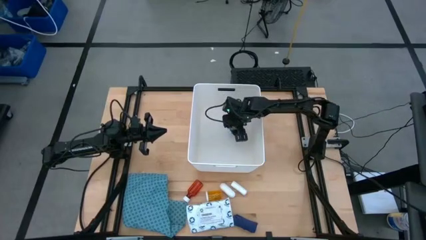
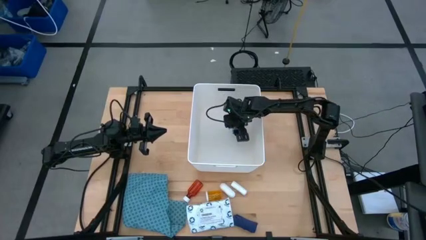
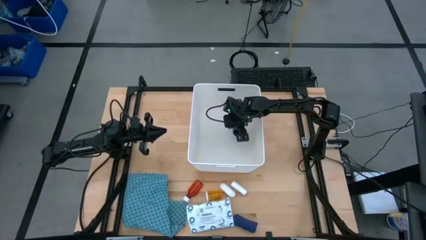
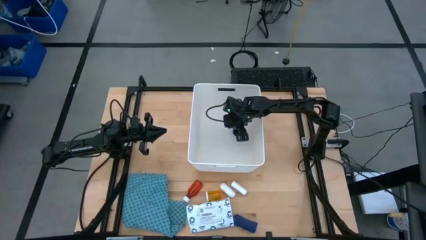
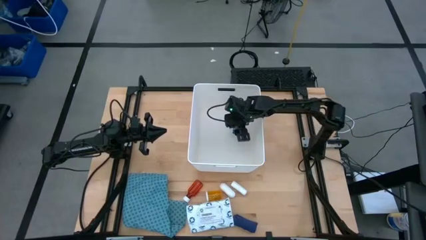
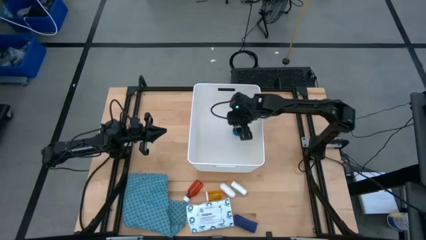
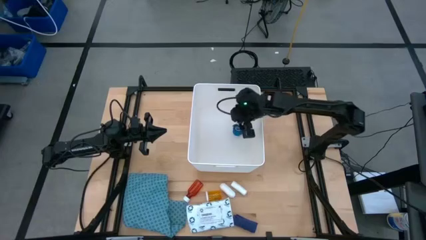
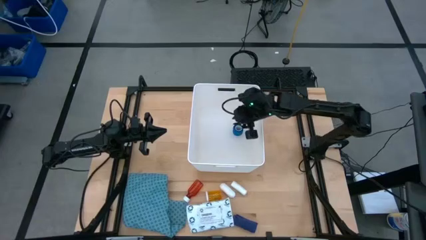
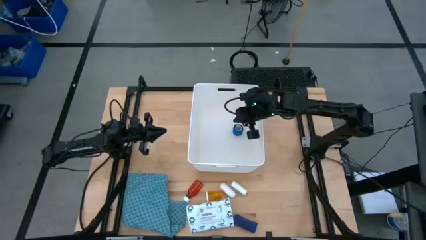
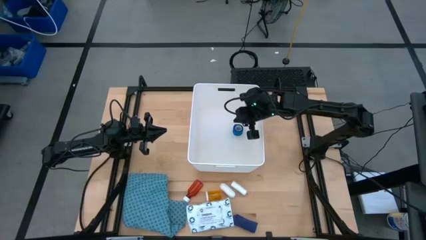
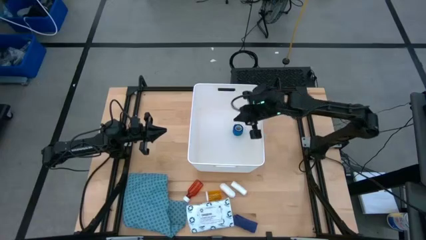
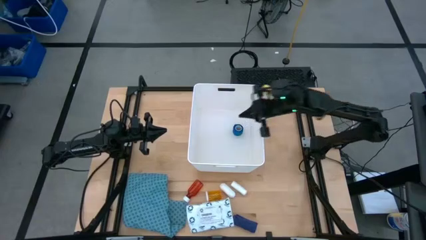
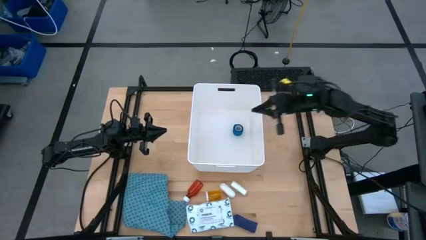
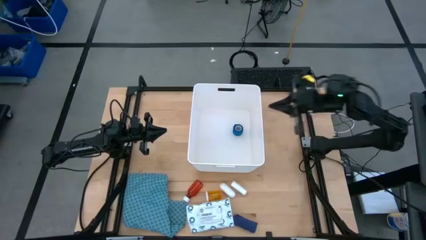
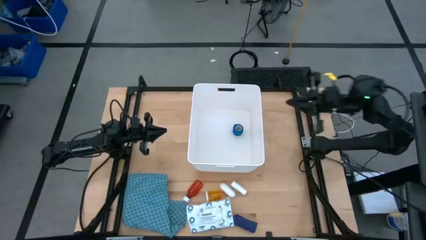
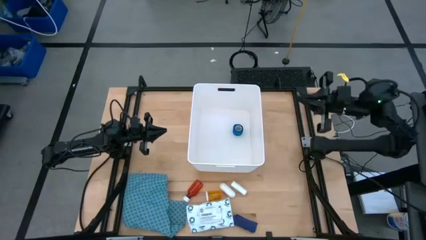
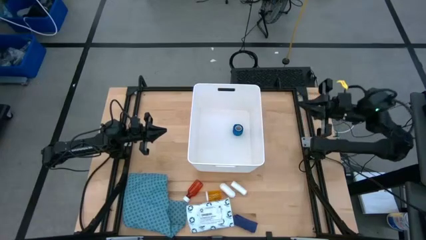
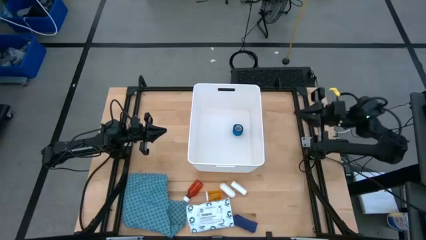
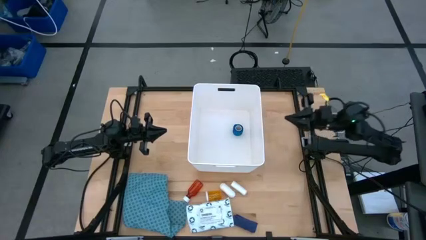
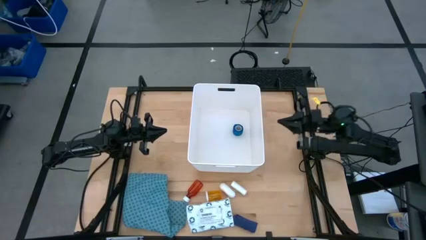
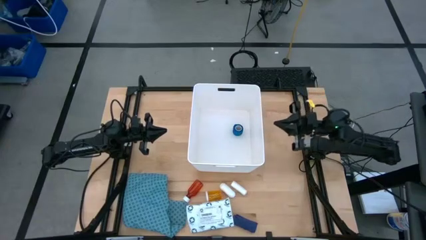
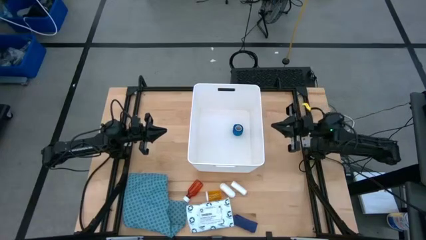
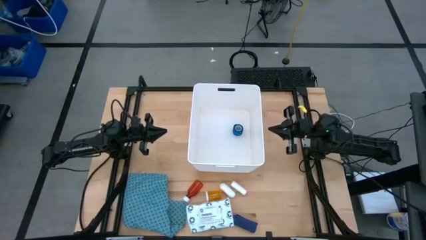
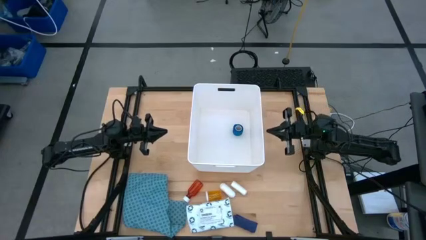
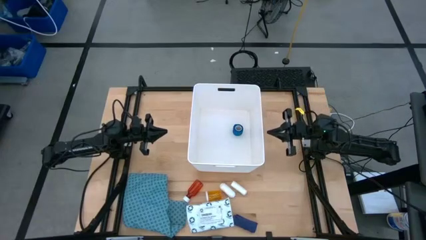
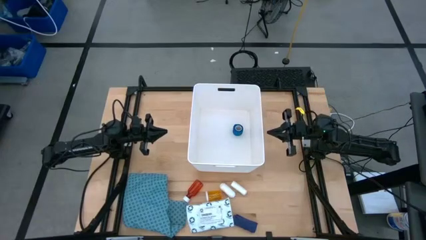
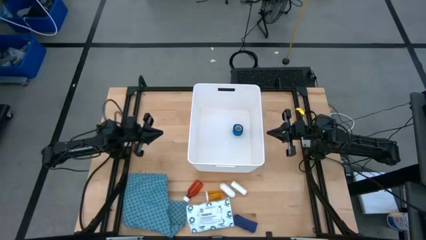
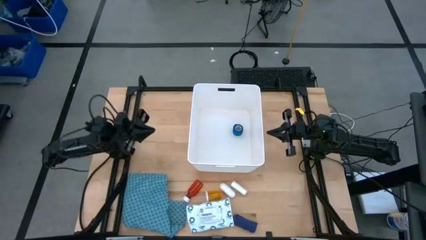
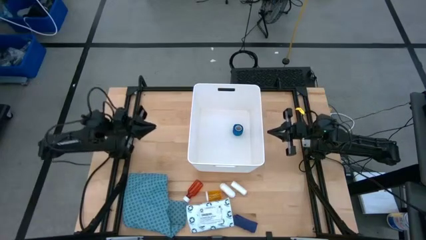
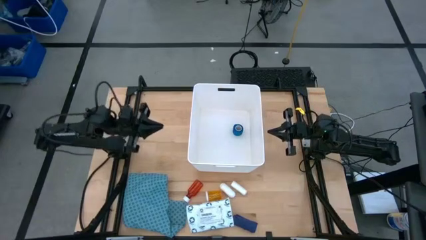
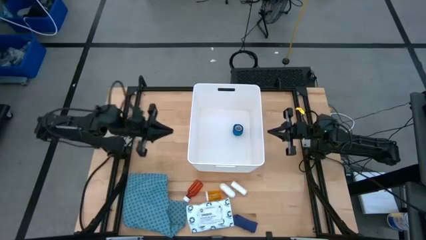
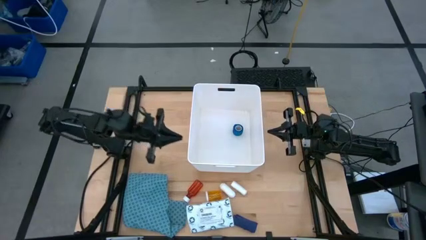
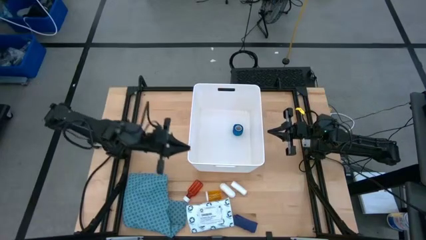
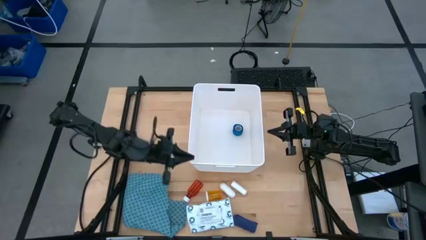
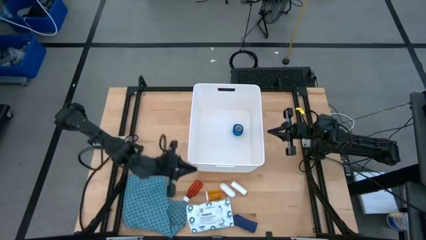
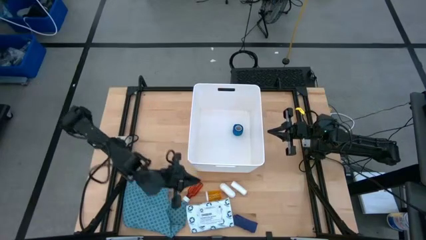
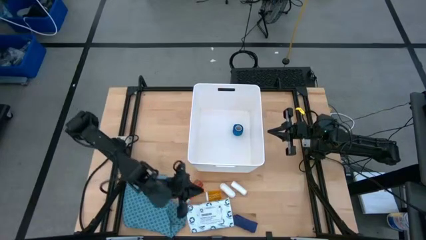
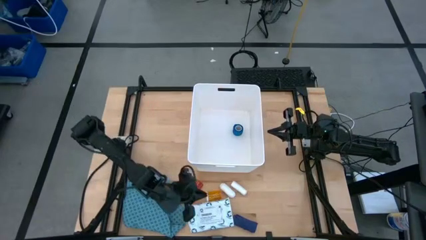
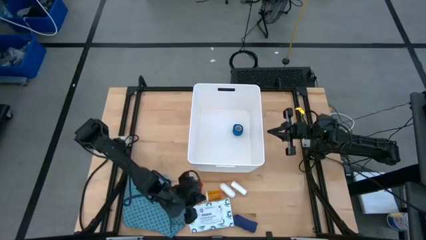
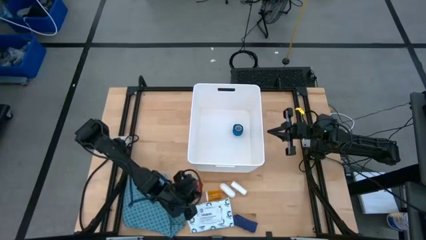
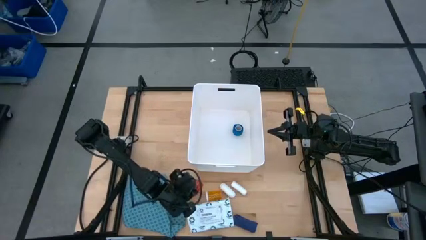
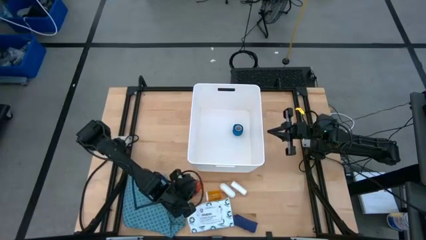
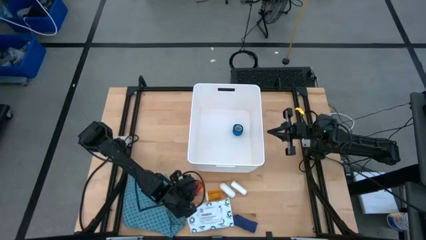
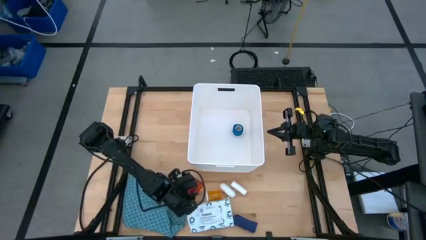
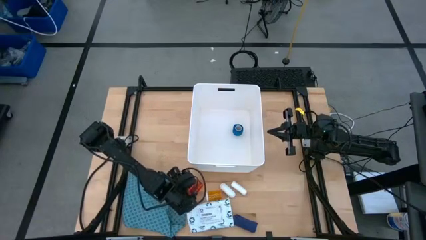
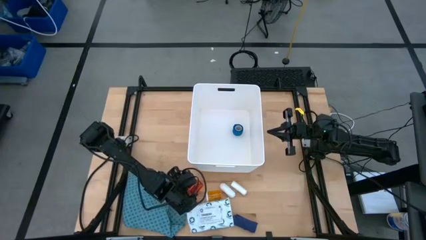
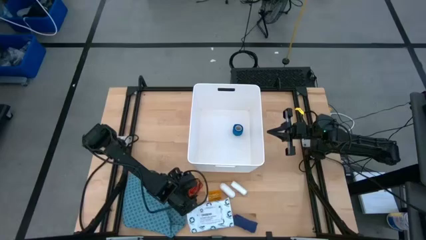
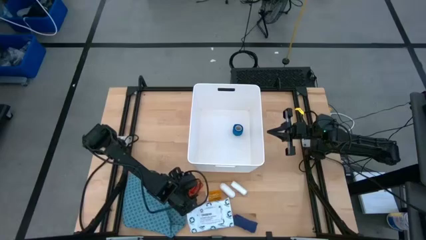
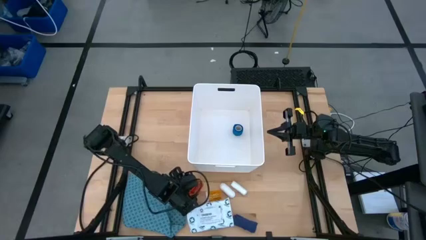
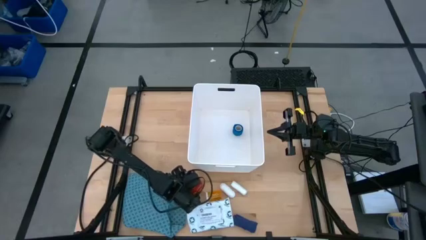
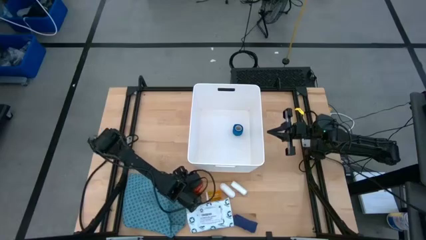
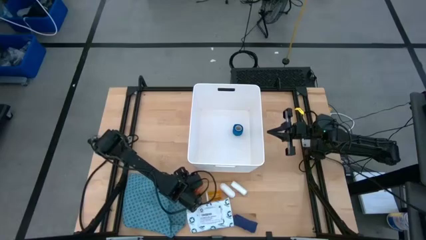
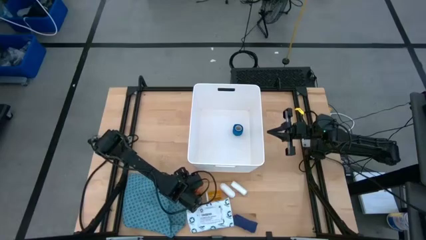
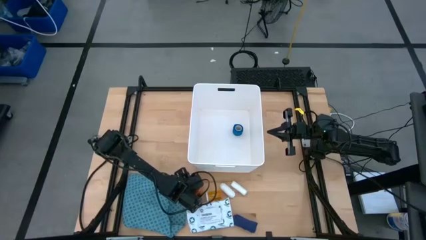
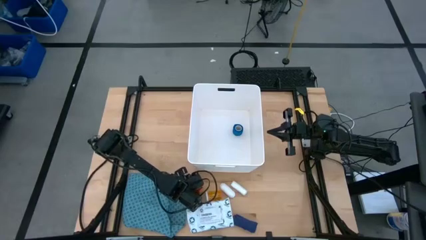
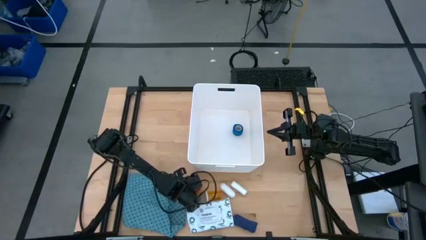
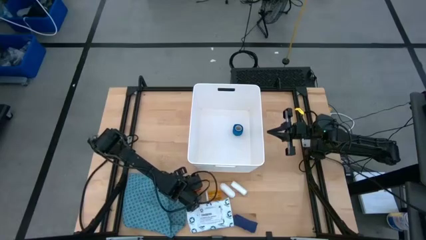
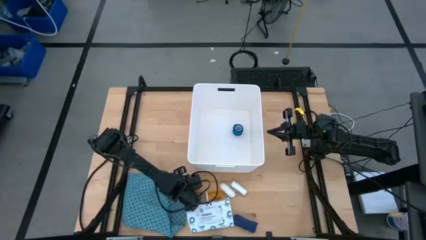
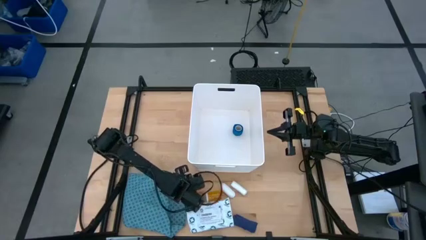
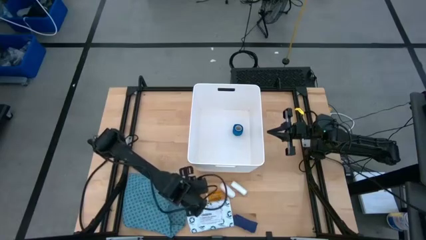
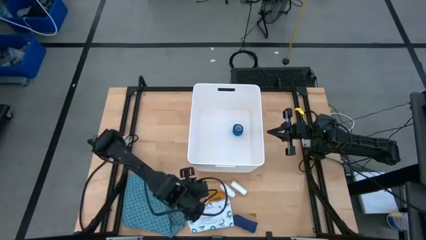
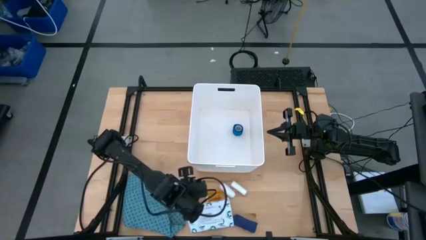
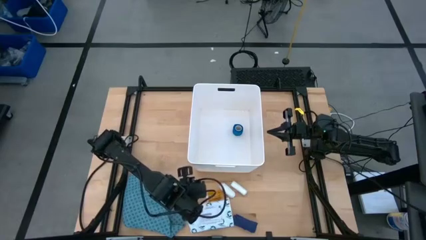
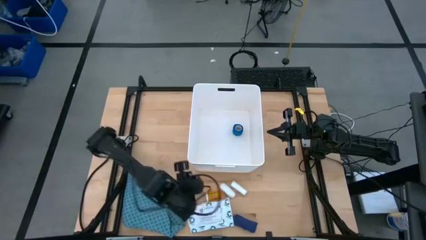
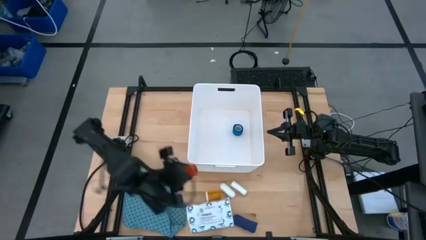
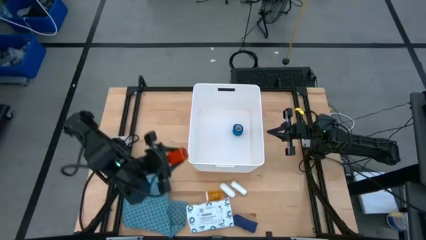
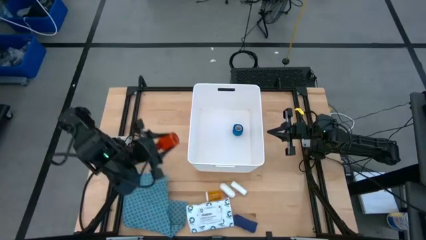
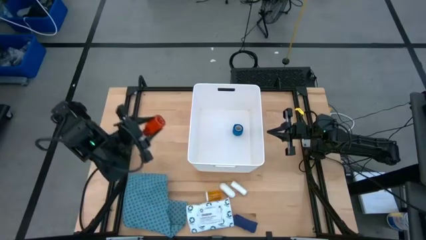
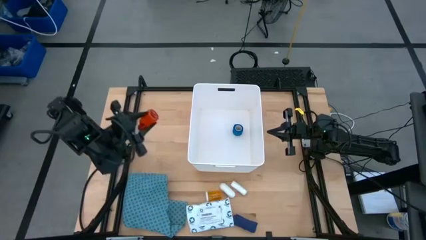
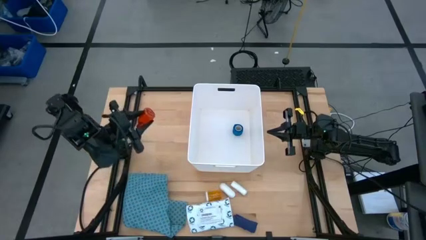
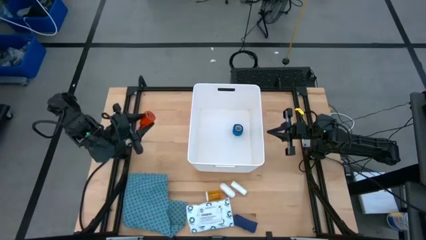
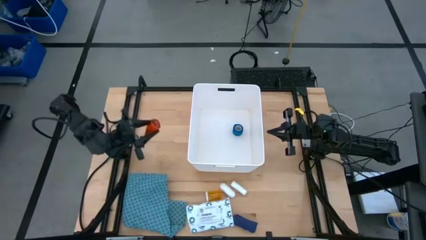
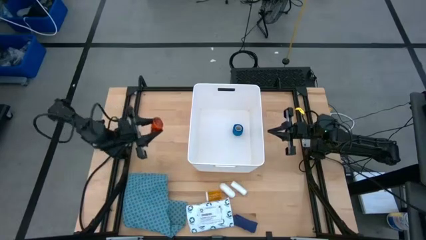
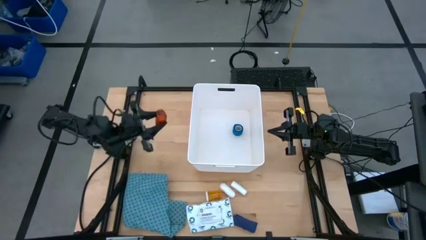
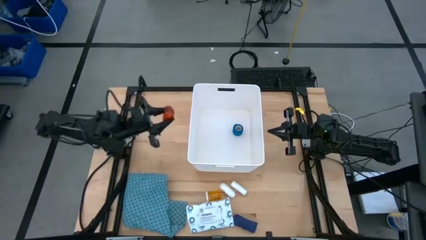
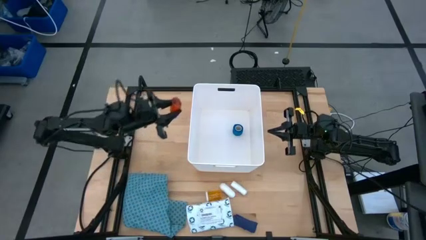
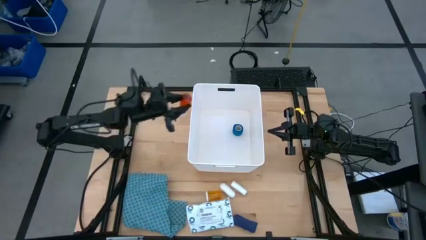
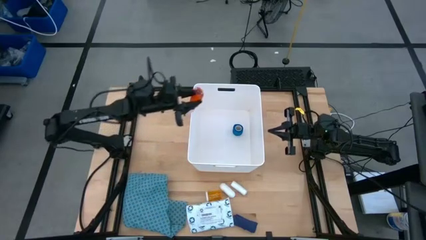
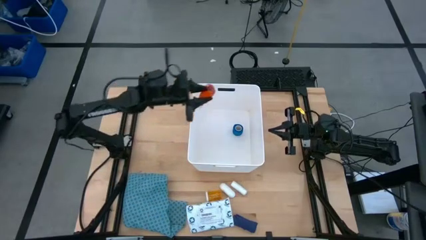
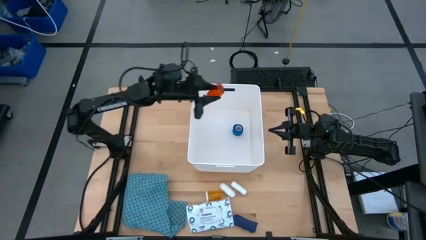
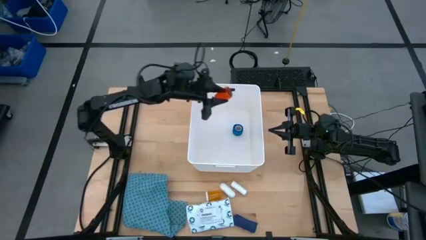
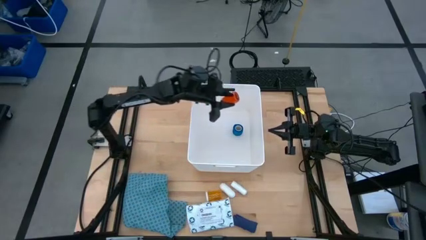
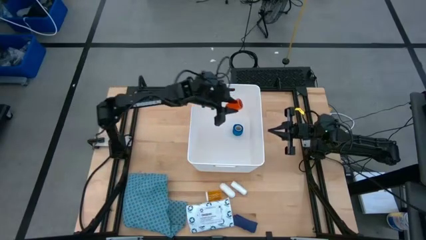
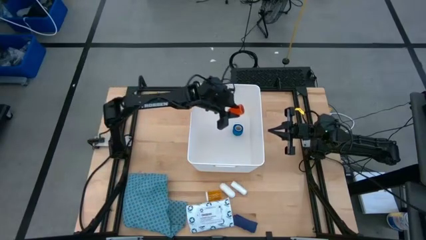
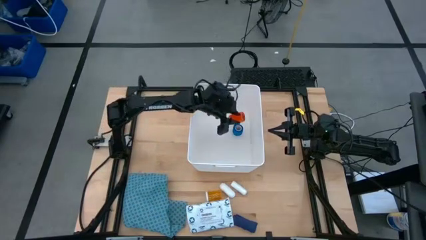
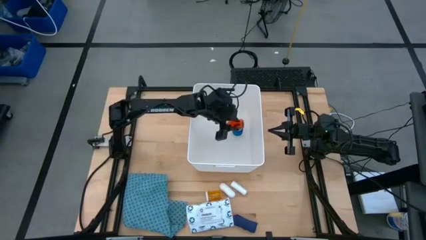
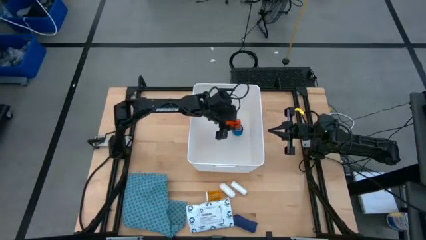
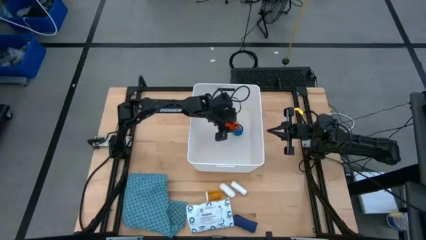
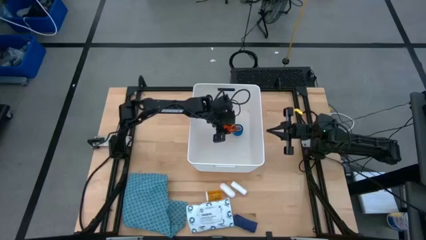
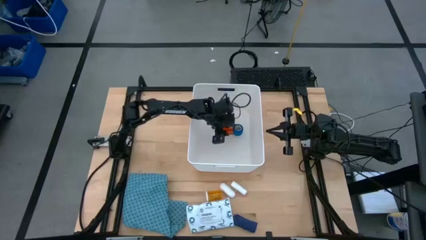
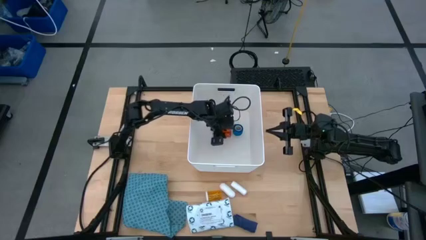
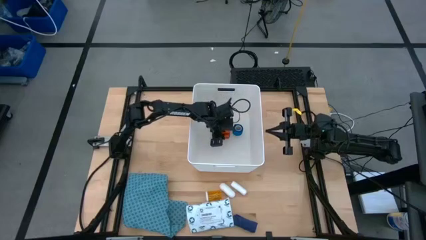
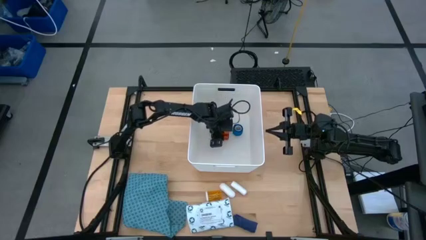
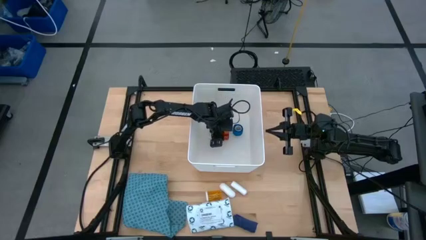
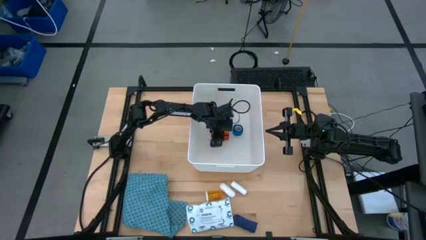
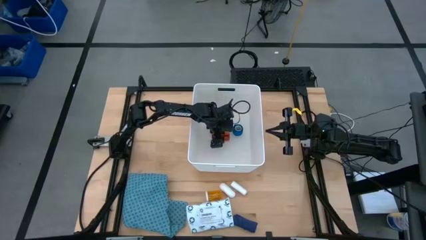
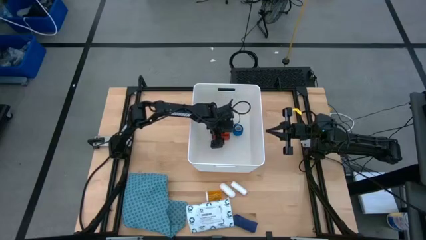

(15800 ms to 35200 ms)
Task: Pick & place medical supplies in basket/bin
Put the red pill bottle into the white bin
